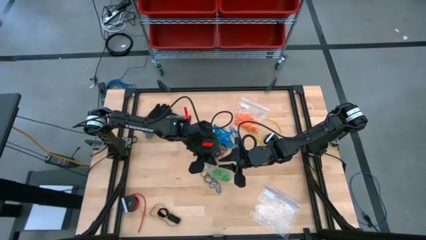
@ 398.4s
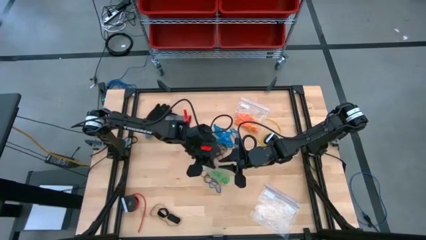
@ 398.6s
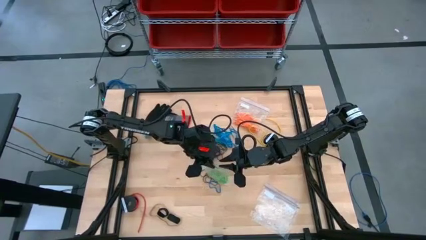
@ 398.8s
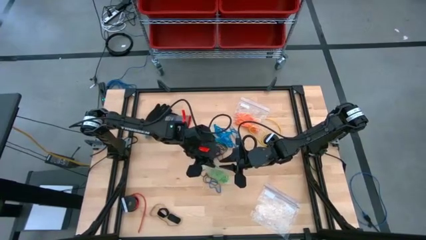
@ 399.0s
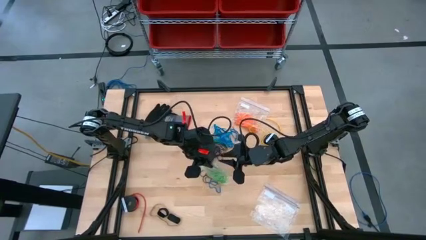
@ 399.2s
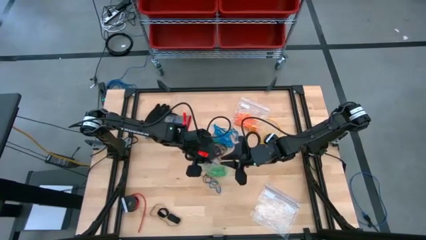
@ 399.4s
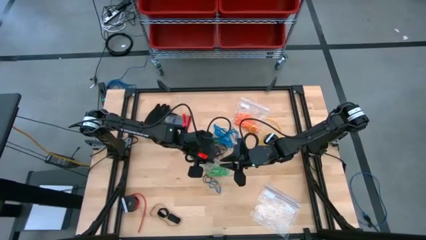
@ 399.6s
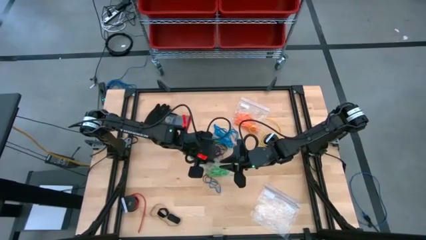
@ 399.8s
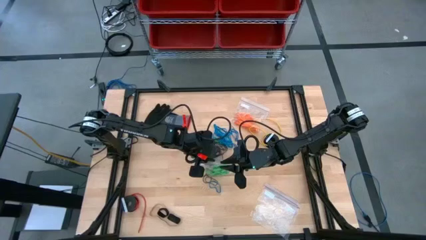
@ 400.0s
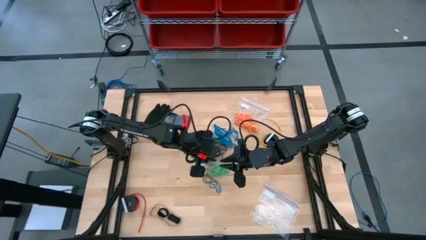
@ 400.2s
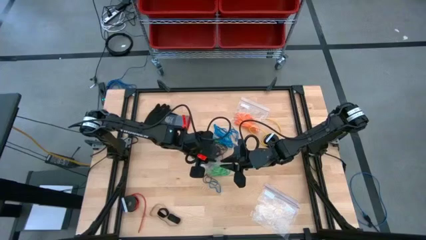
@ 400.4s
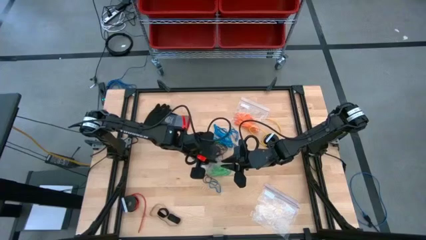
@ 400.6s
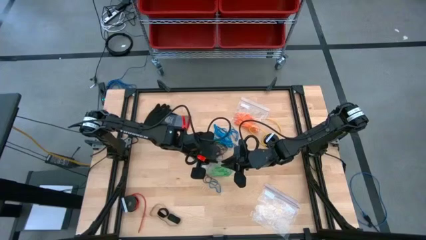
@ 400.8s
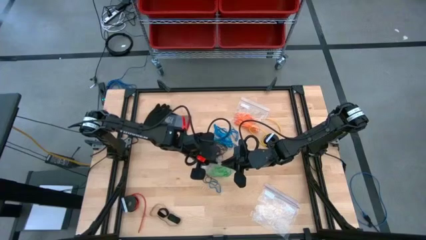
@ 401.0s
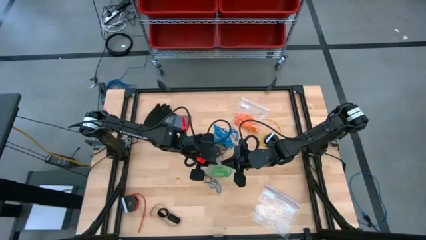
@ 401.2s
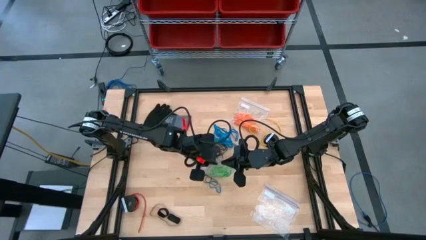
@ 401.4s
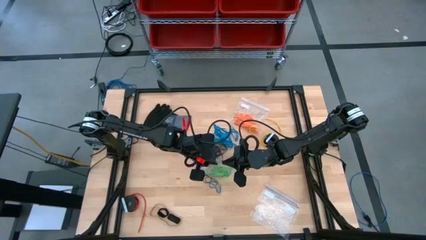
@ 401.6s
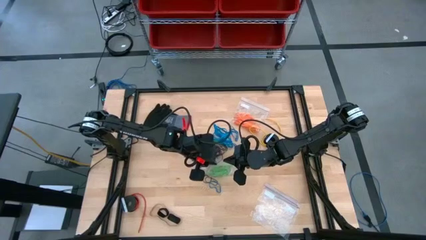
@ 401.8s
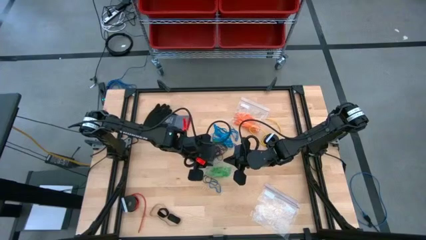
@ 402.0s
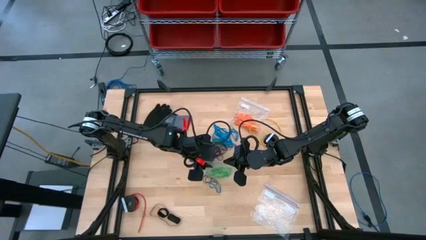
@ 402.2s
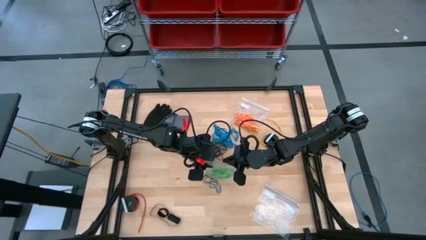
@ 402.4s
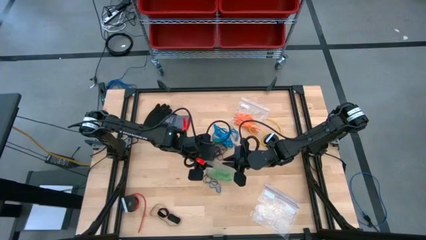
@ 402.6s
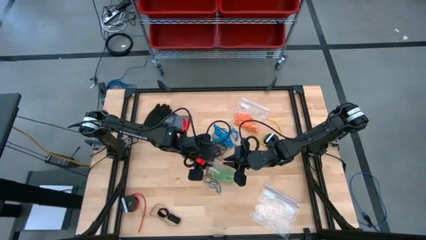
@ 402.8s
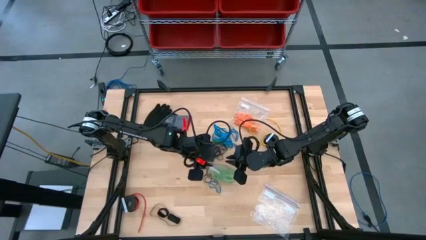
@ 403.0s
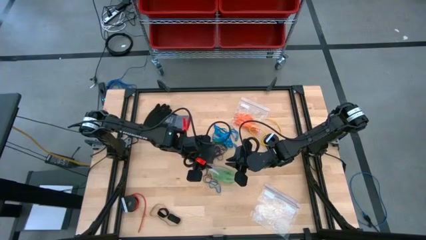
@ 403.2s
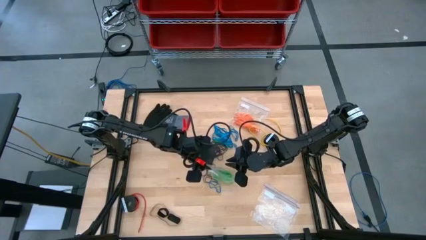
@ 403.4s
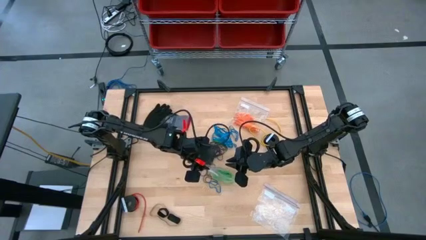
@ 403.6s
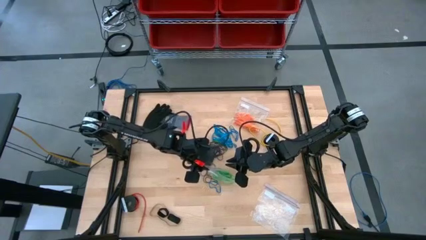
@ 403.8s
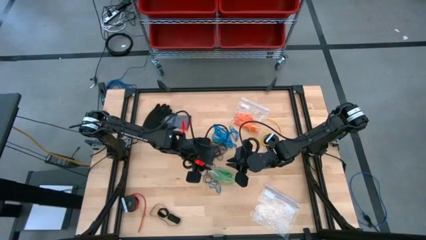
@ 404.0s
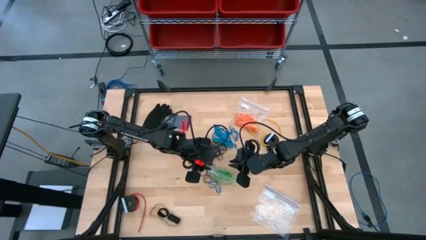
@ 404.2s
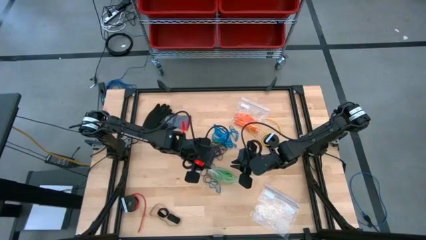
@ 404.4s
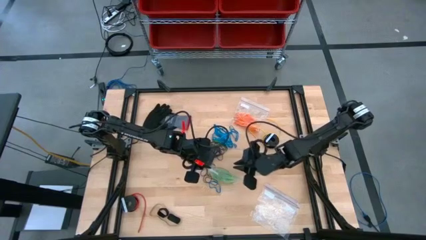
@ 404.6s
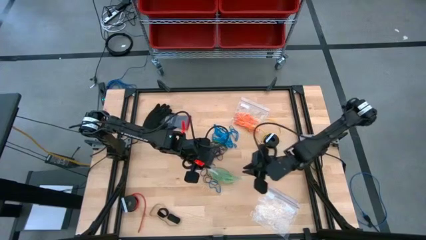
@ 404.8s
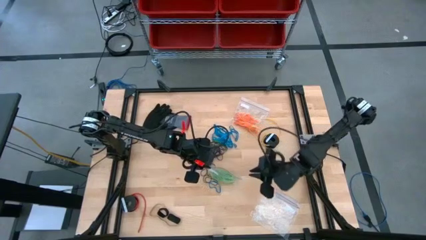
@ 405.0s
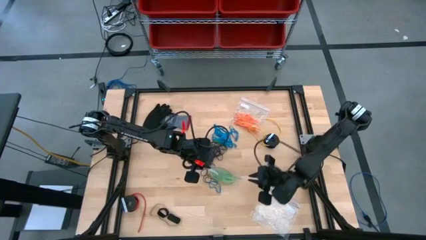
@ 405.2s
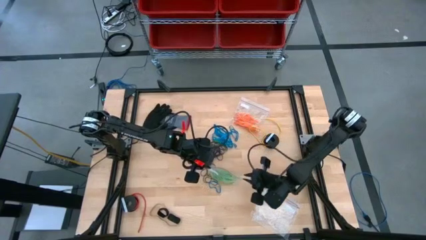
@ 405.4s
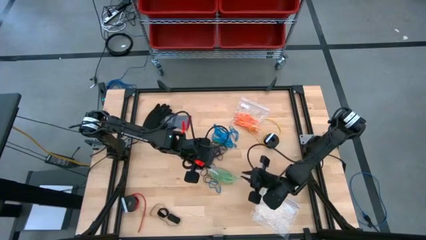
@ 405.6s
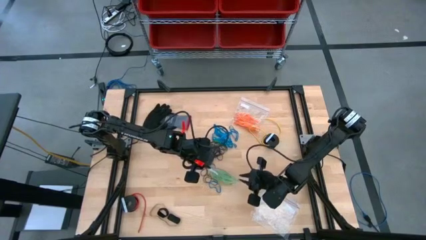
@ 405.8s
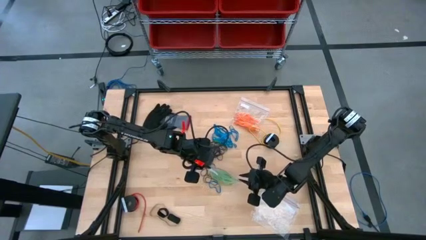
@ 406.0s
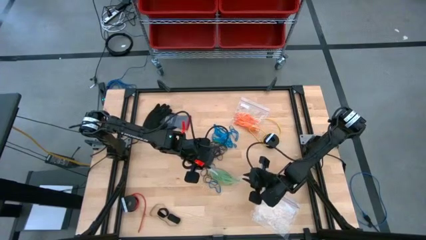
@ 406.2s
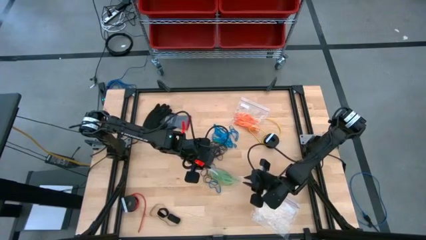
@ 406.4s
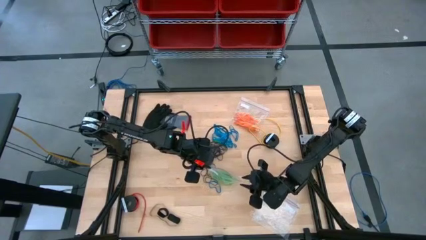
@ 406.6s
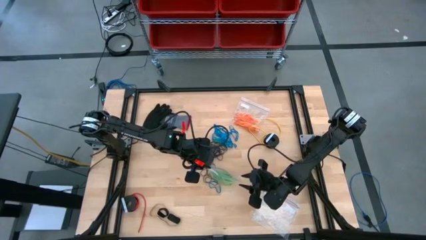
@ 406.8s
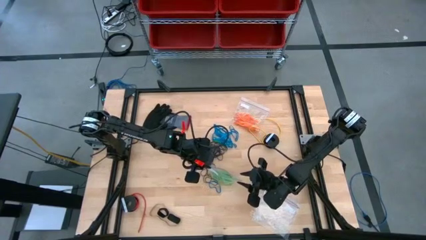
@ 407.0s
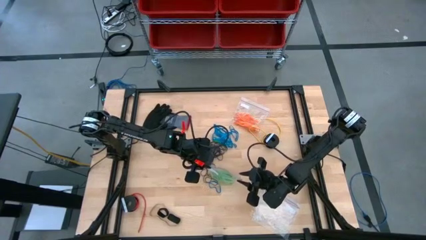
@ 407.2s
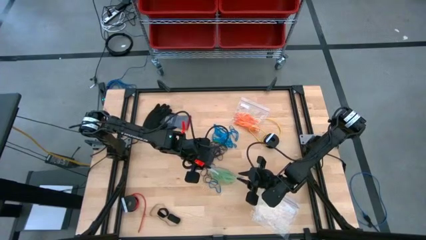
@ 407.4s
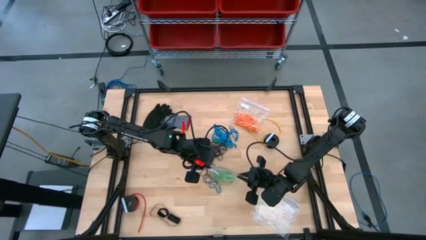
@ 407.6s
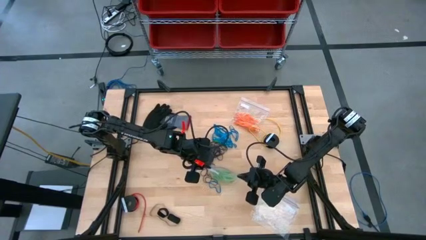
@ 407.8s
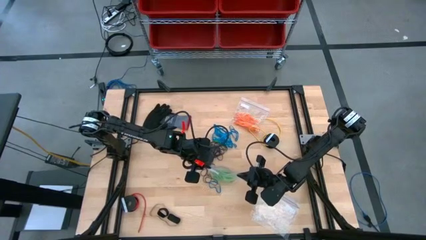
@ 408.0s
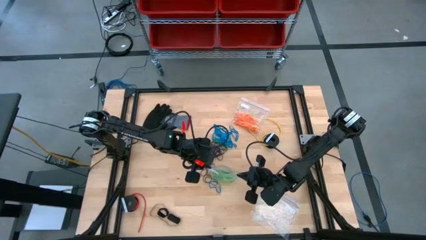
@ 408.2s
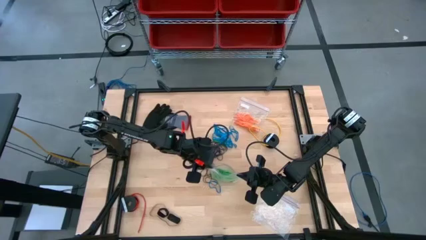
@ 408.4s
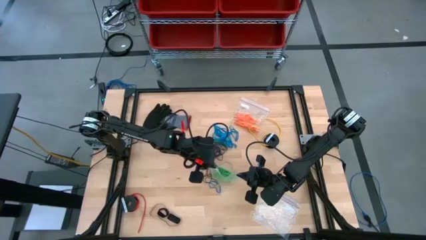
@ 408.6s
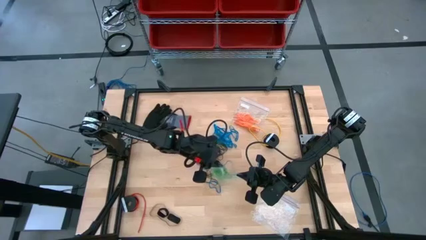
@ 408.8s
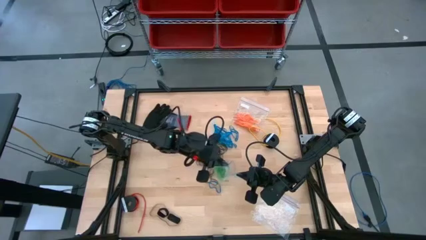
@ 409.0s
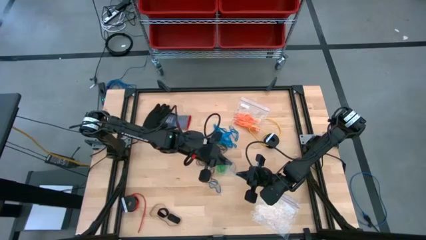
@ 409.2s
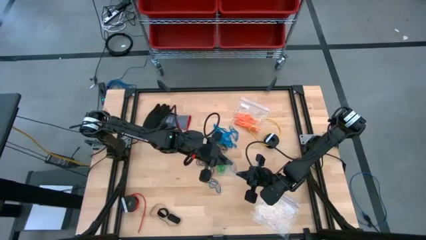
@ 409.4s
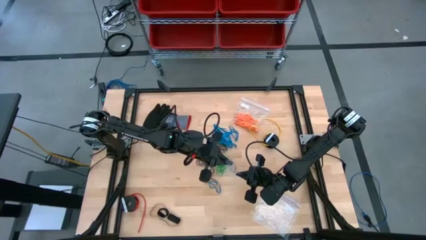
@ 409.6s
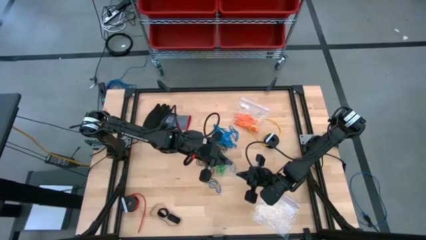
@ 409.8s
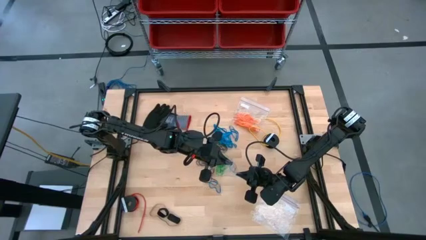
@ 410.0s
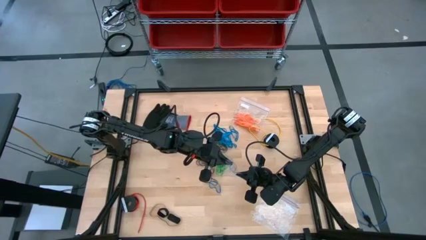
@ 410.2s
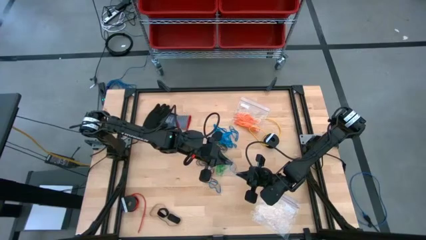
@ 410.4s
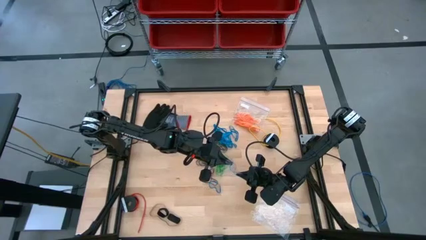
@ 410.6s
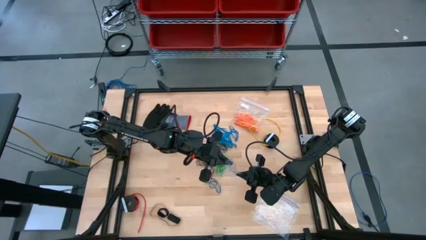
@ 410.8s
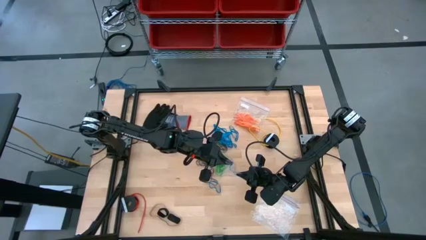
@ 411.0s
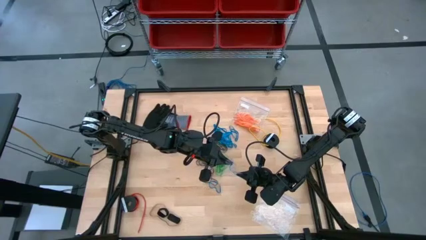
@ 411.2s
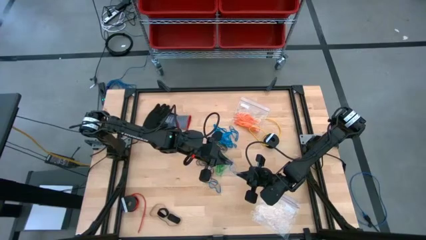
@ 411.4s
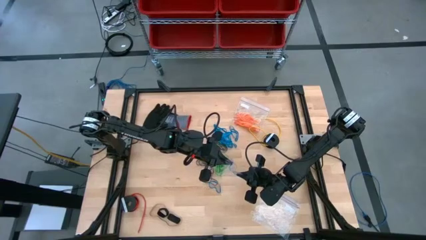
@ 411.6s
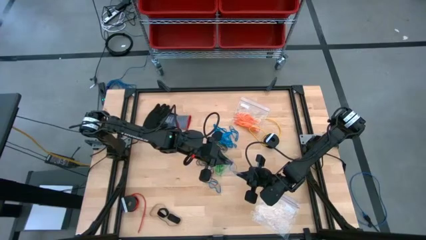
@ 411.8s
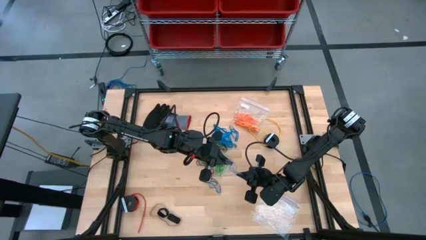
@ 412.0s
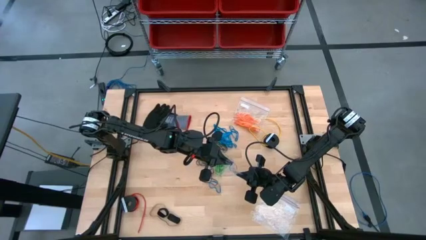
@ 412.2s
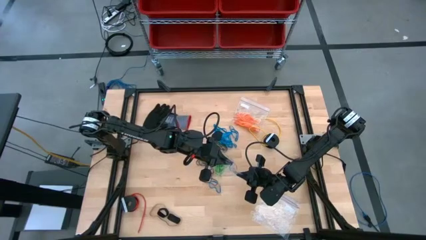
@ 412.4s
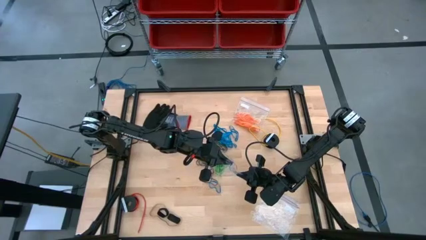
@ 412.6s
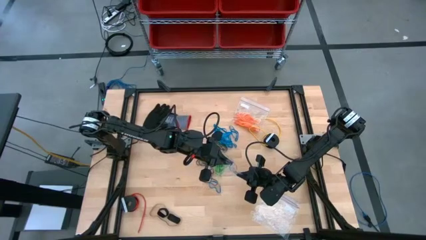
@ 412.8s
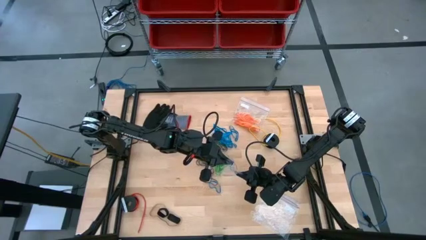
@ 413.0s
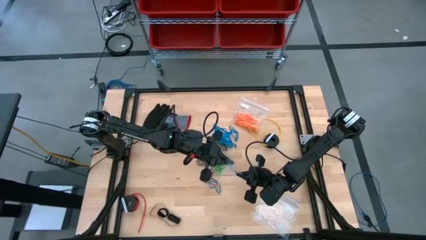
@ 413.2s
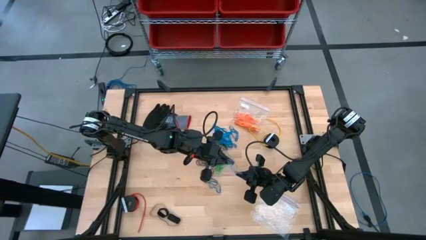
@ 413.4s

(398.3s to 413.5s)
Task: Sort rubber bands
Close the transparent zip bag
